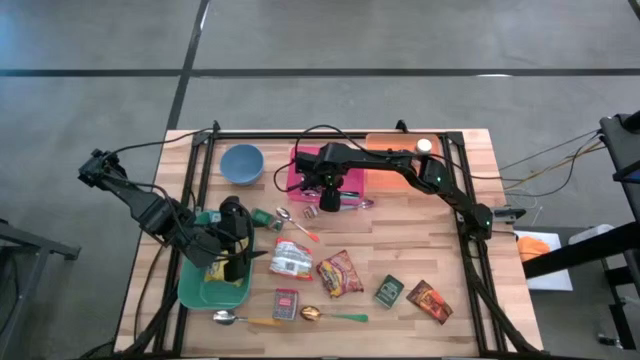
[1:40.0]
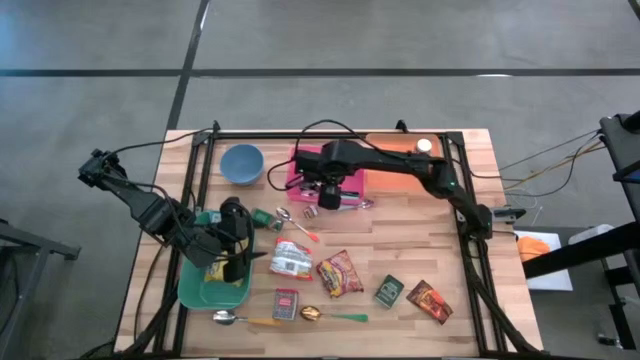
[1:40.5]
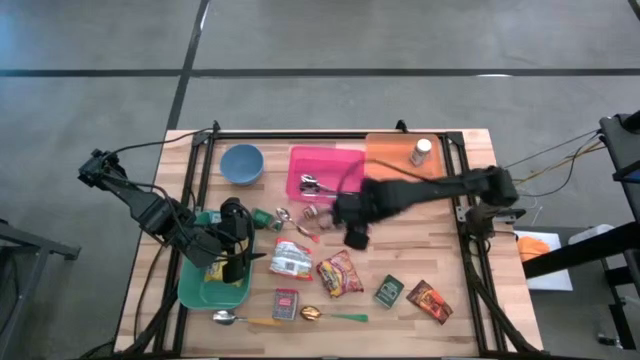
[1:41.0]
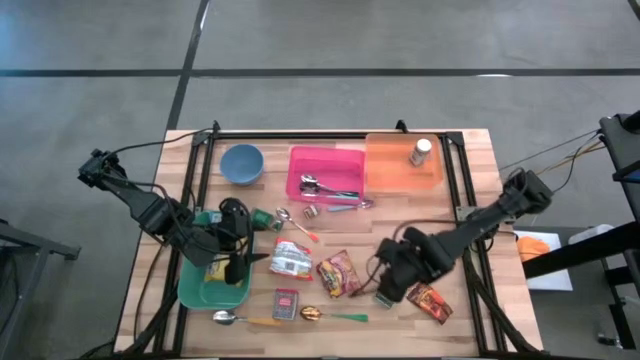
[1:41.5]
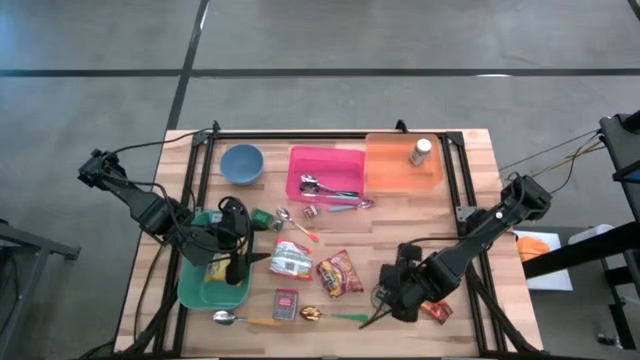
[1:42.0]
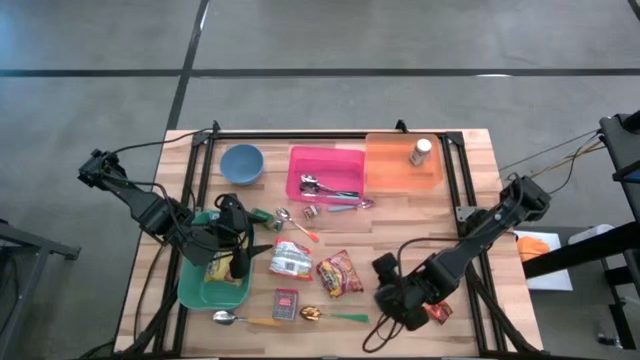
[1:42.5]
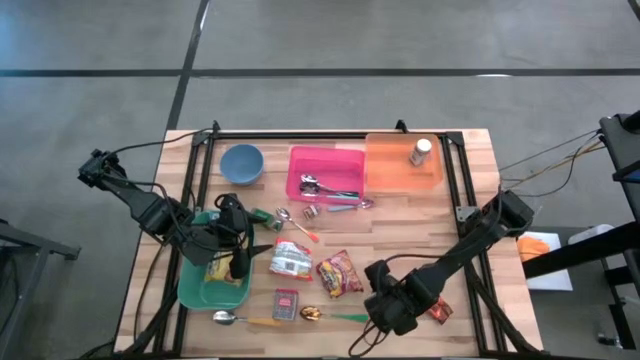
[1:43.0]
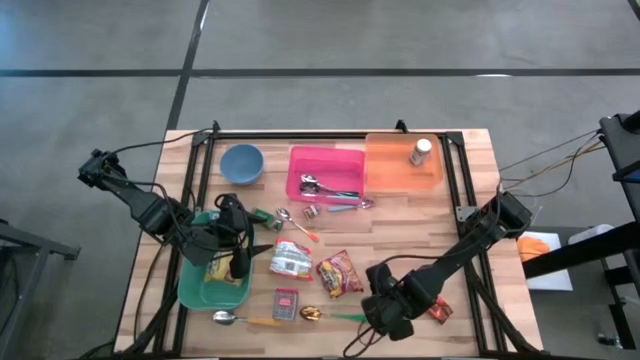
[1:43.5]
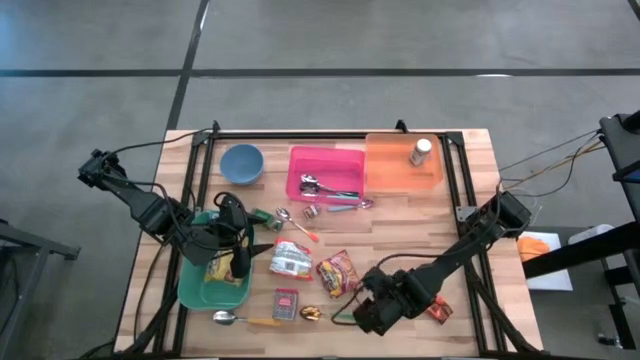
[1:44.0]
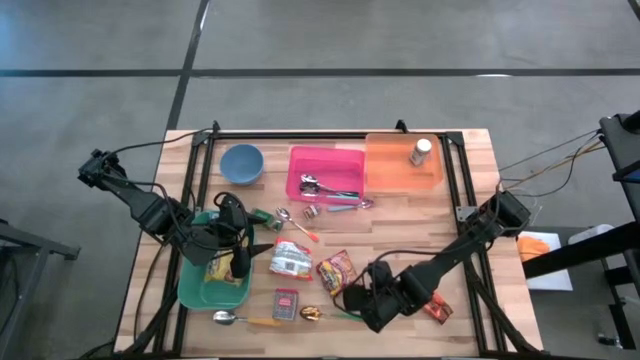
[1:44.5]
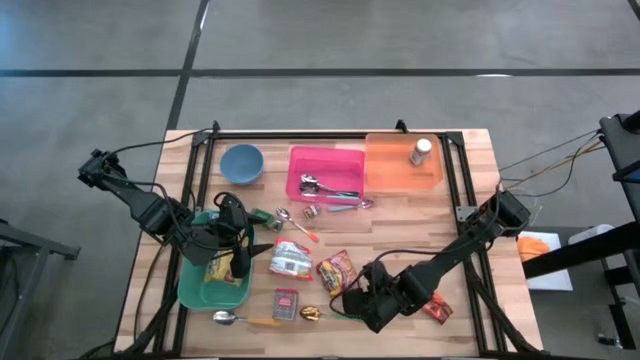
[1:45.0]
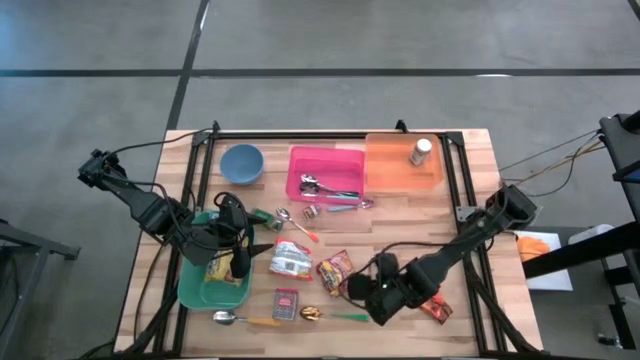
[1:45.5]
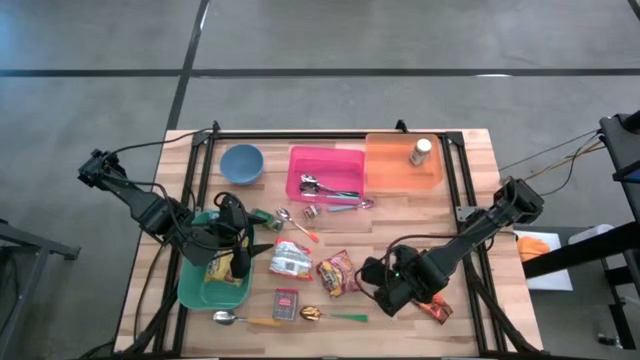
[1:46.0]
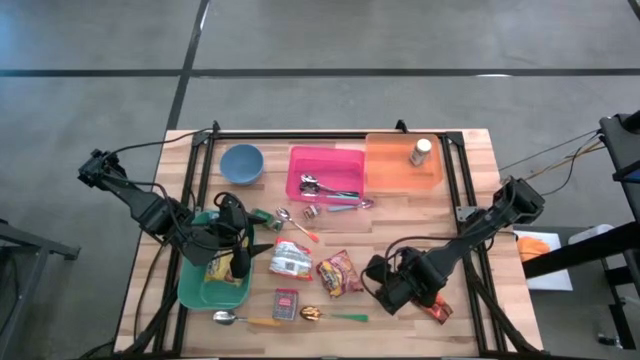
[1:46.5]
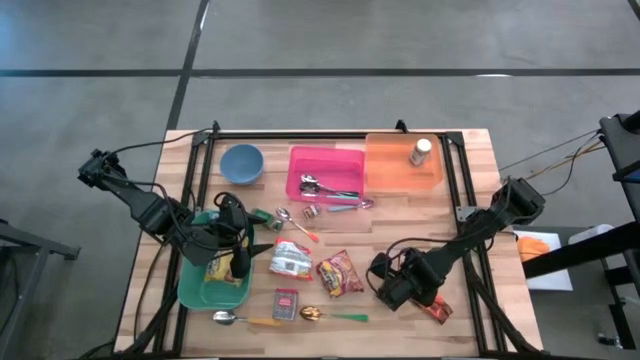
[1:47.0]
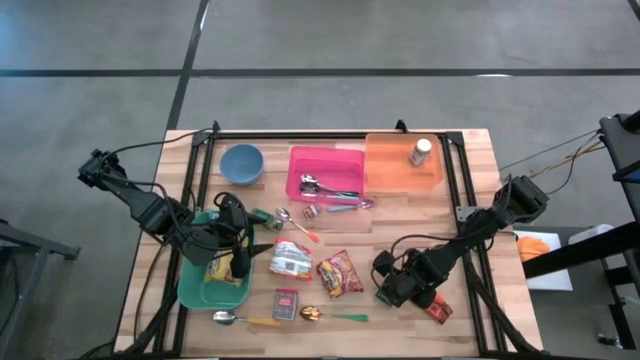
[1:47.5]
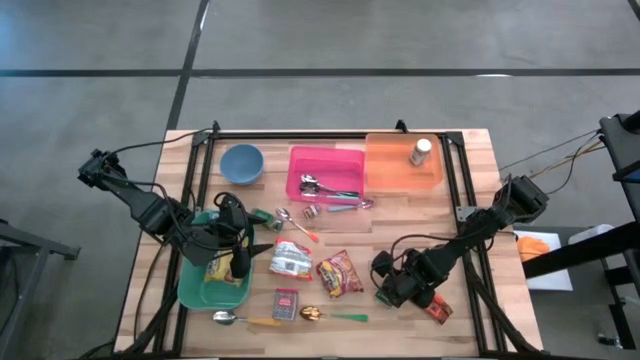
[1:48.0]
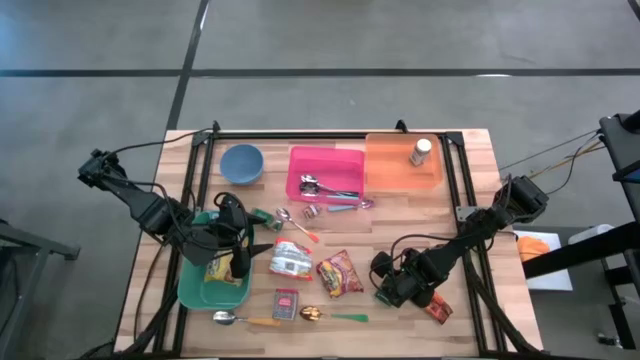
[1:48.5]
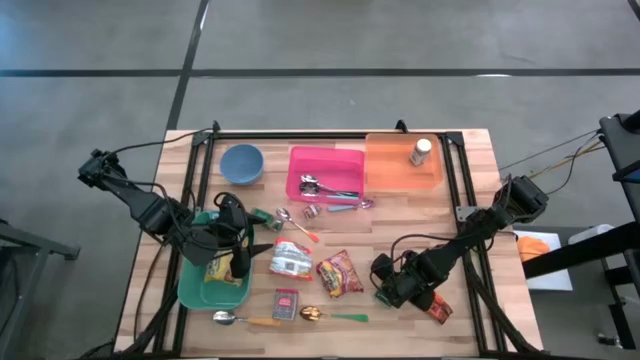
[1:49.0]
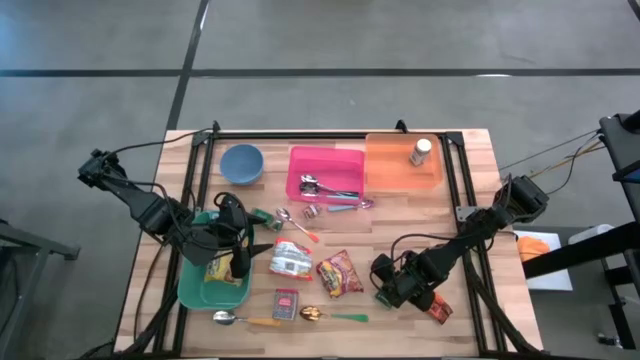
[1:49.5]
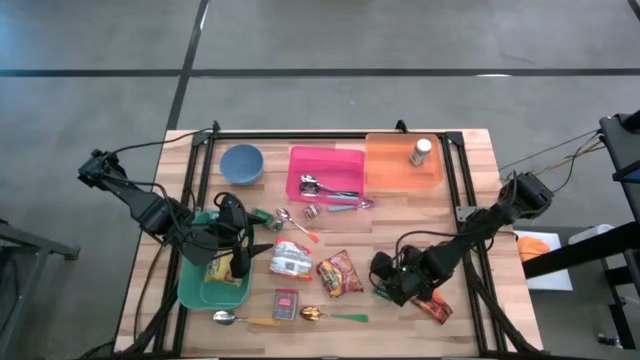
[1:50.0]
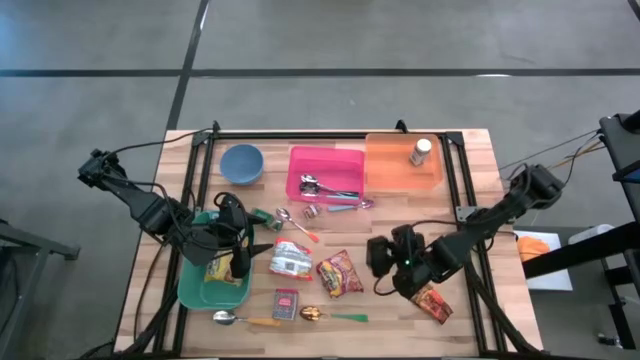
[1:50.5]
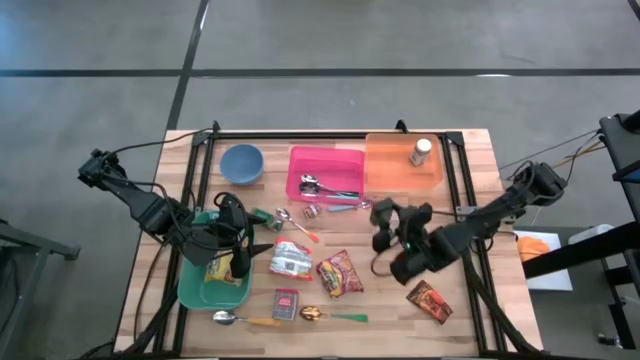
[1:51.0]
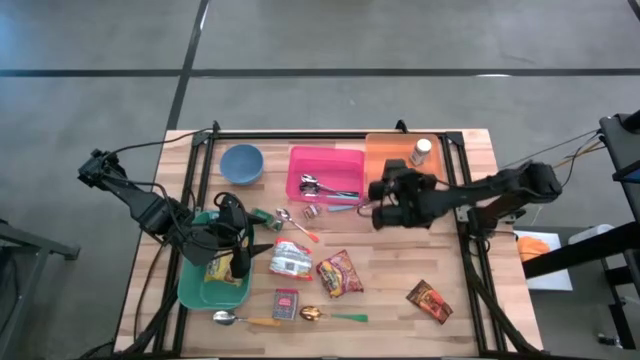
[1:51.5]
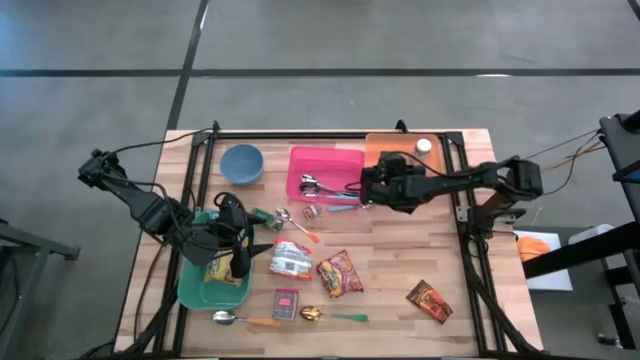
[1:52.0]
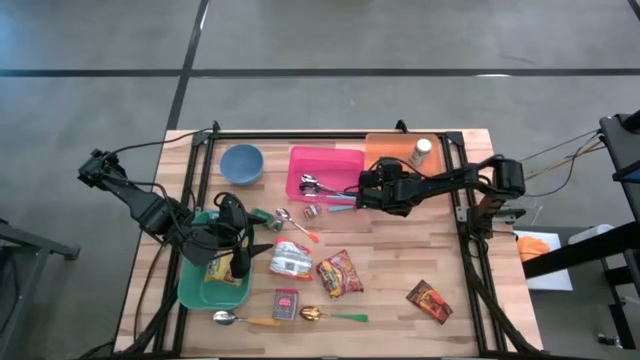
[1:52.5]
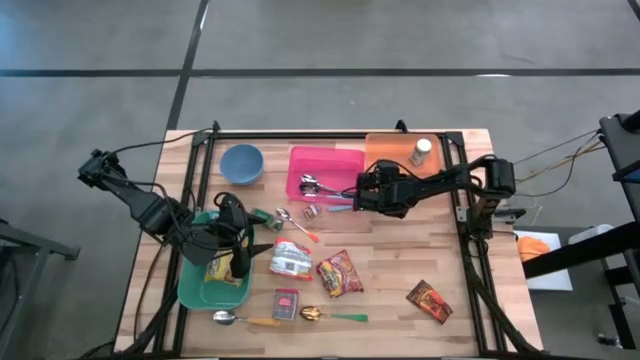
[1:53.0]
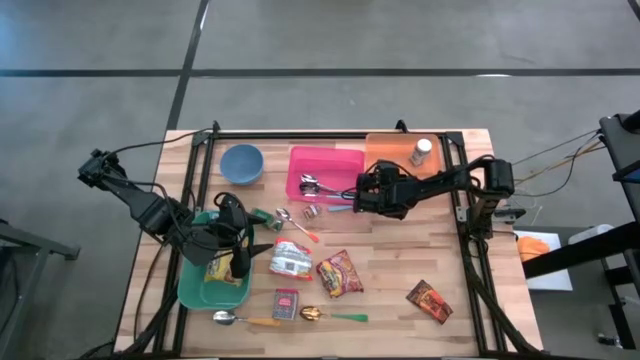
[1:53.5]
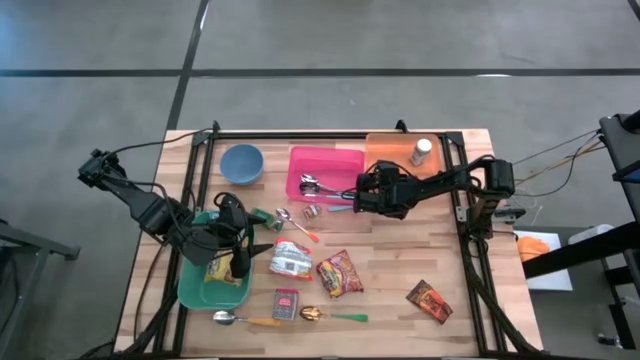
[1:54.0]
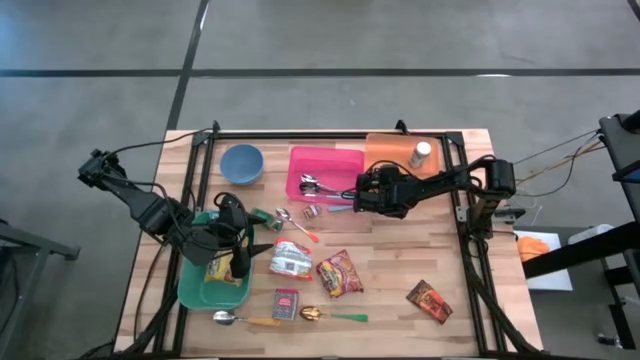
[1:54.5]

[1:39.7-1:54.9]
Put the black spice can into the orange bin

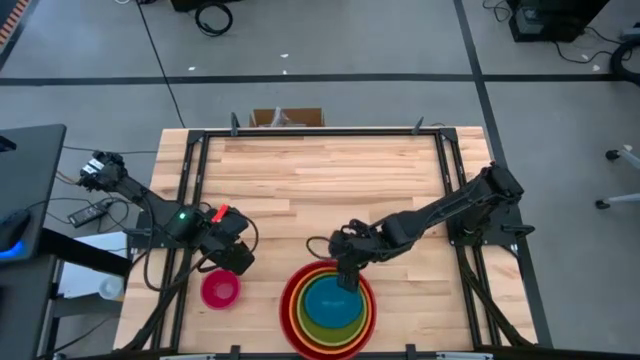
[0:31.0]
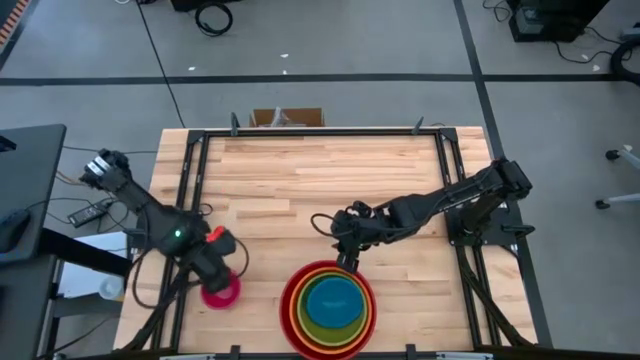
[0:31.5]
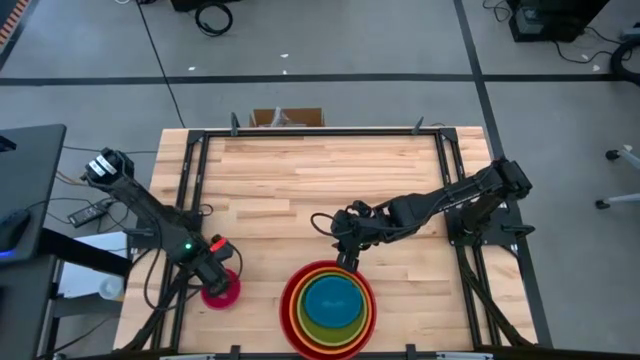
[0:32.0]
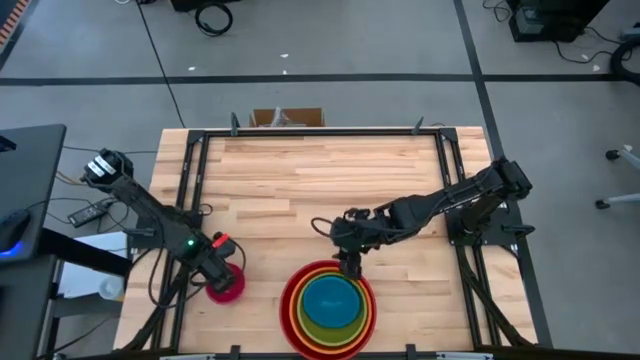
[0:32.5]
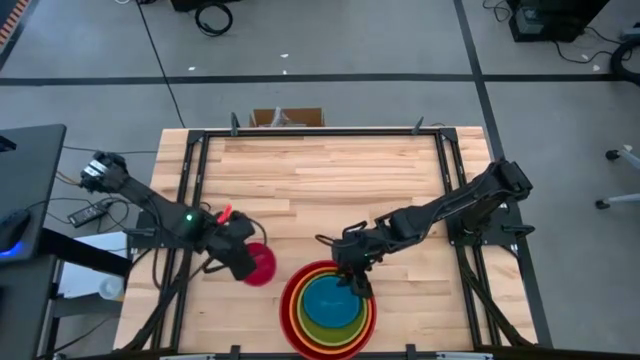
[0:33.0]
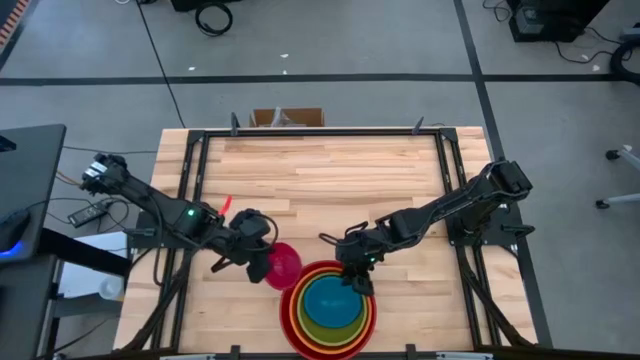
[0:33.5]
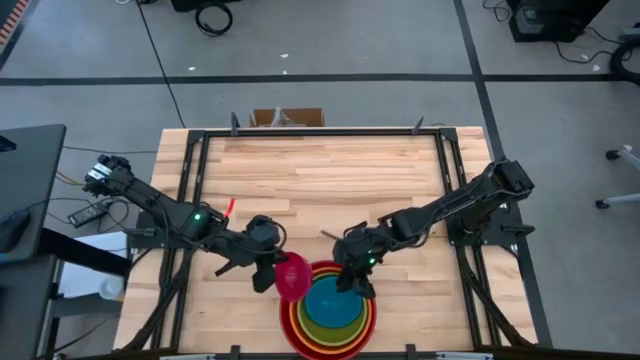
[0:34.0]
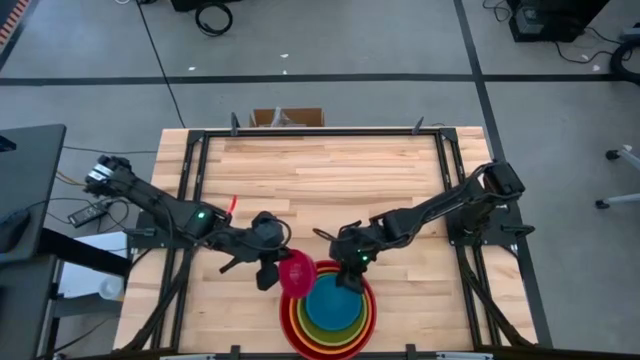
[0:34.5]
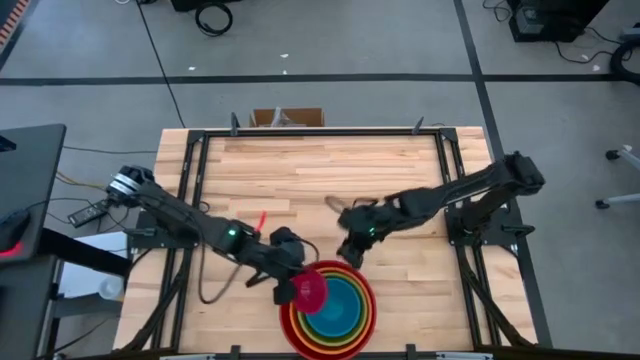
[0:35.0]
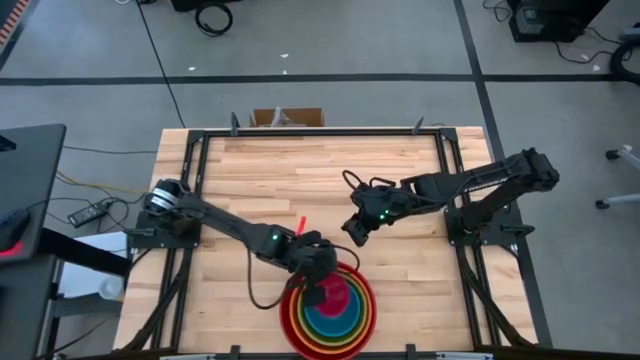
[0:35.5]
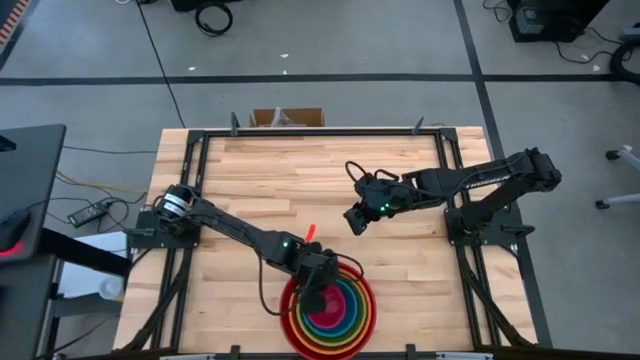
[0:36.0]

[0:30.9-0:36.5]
Stack the pink bowl on top of the blue bowl
